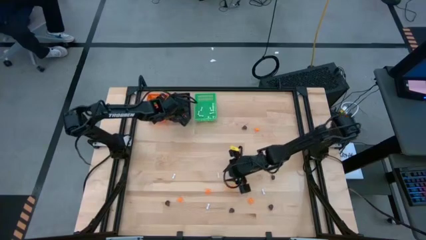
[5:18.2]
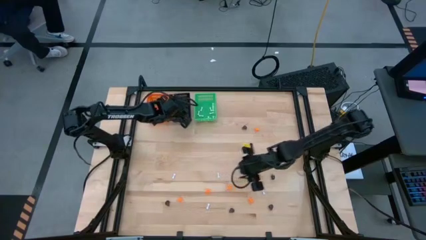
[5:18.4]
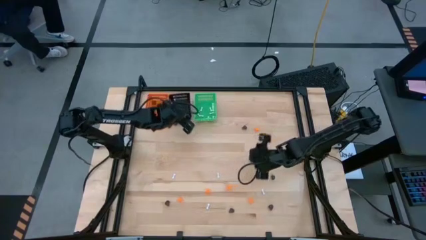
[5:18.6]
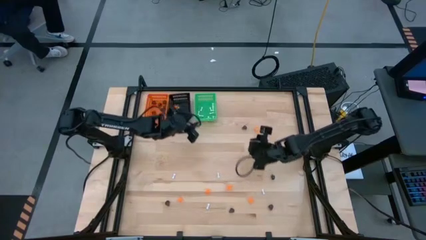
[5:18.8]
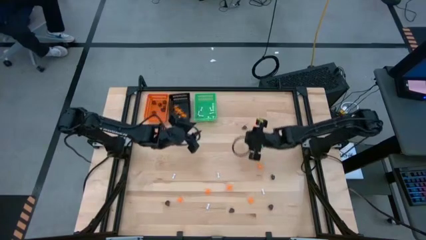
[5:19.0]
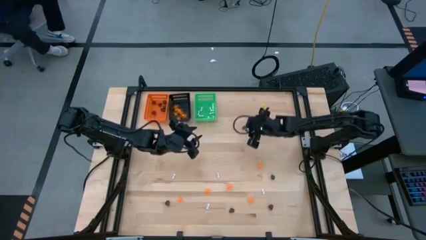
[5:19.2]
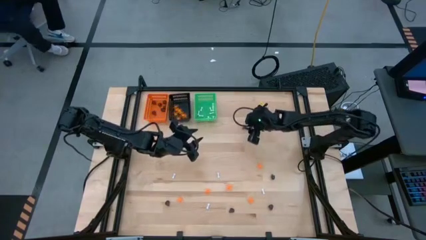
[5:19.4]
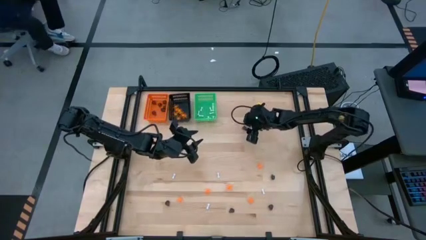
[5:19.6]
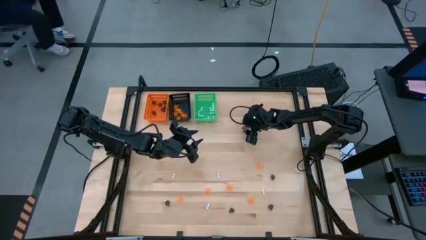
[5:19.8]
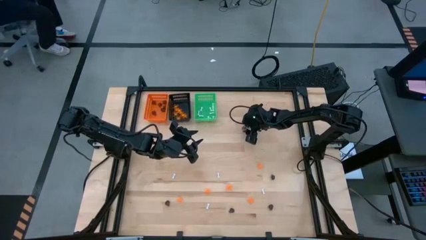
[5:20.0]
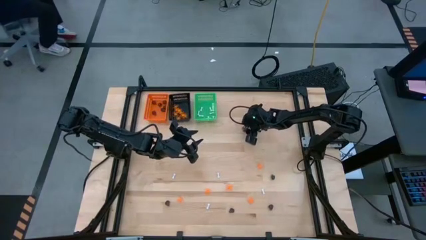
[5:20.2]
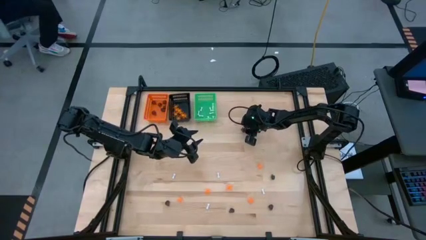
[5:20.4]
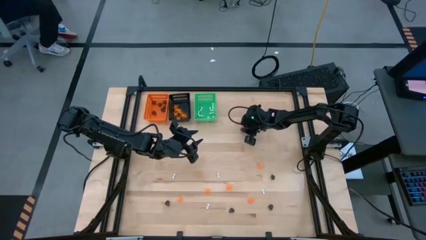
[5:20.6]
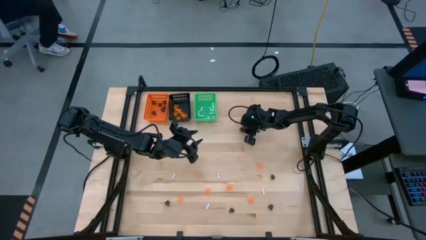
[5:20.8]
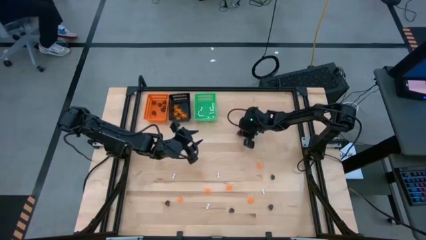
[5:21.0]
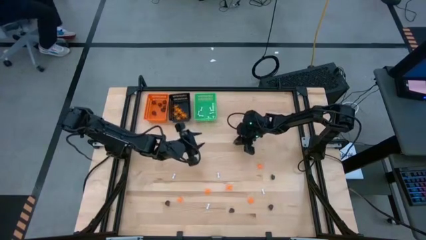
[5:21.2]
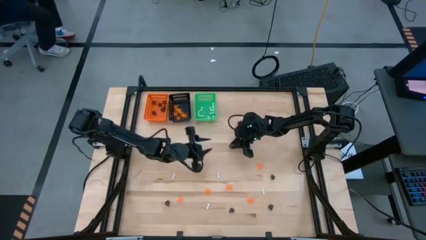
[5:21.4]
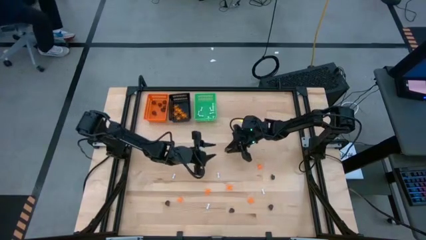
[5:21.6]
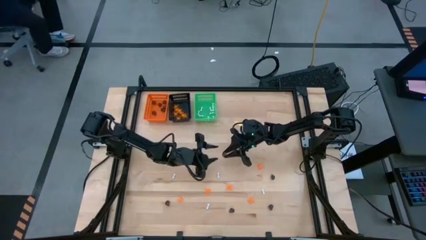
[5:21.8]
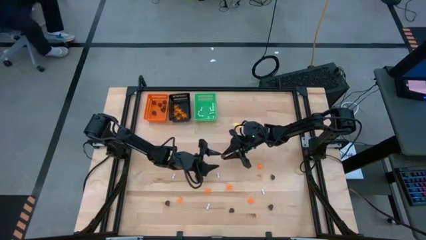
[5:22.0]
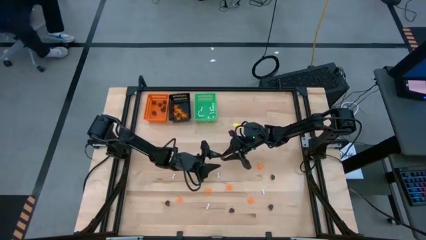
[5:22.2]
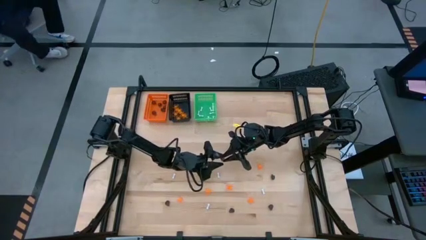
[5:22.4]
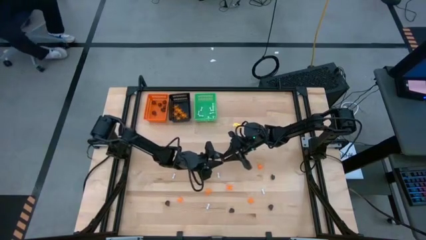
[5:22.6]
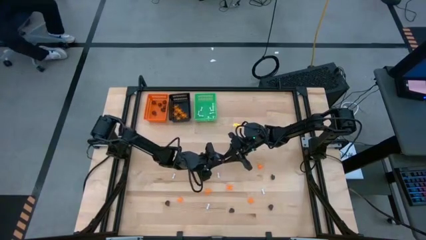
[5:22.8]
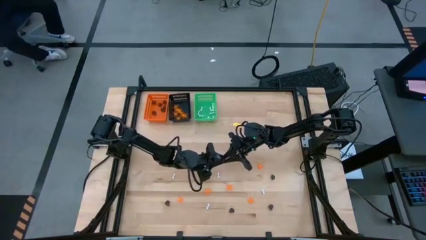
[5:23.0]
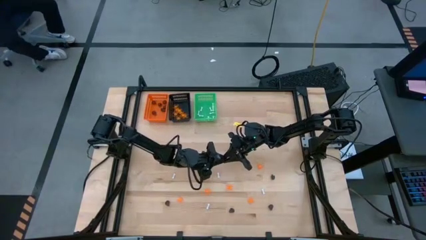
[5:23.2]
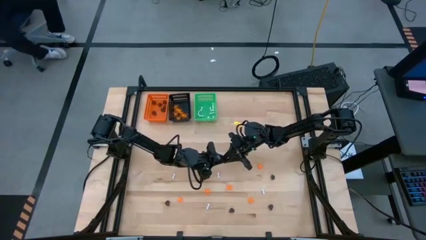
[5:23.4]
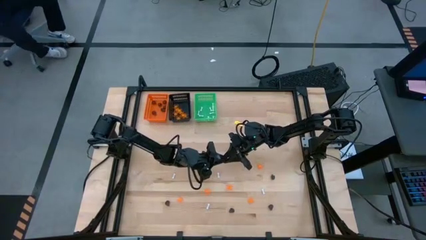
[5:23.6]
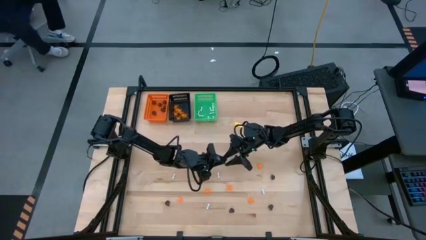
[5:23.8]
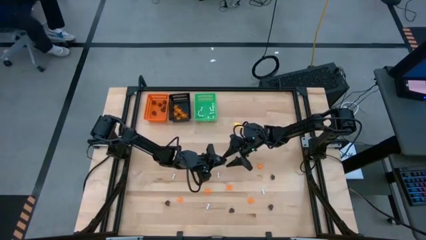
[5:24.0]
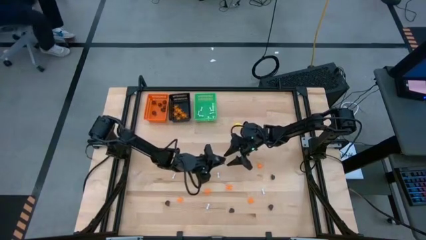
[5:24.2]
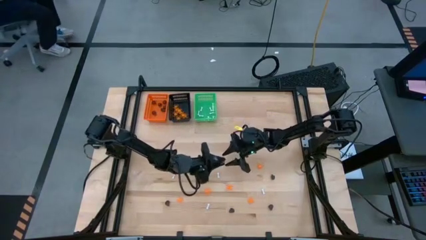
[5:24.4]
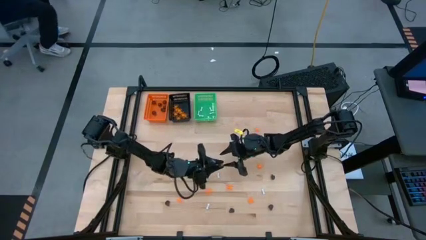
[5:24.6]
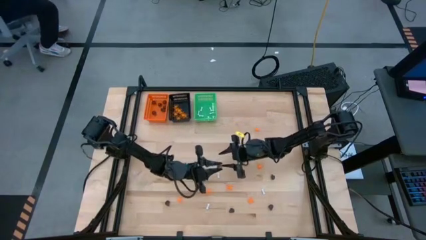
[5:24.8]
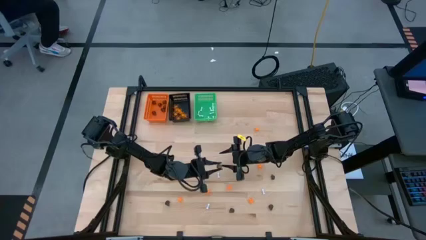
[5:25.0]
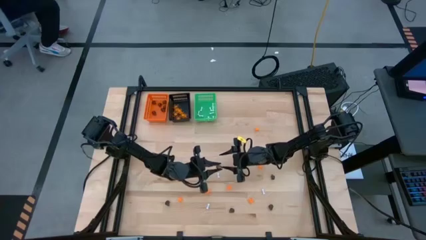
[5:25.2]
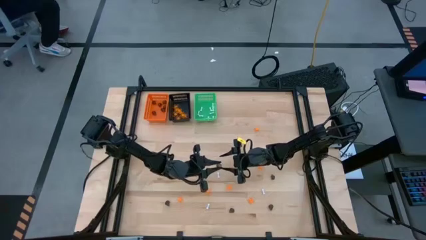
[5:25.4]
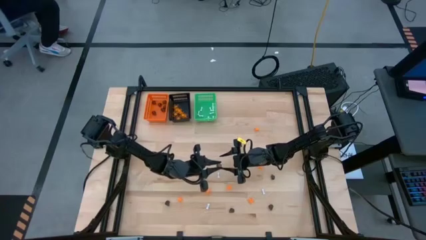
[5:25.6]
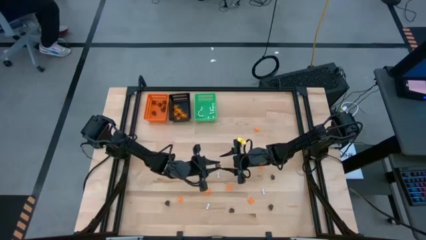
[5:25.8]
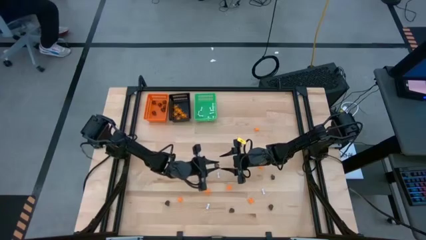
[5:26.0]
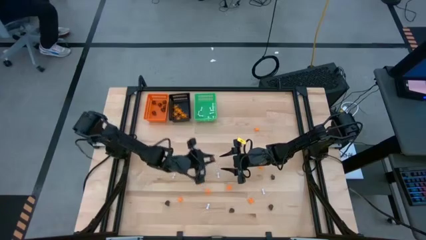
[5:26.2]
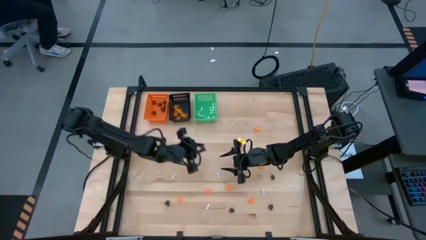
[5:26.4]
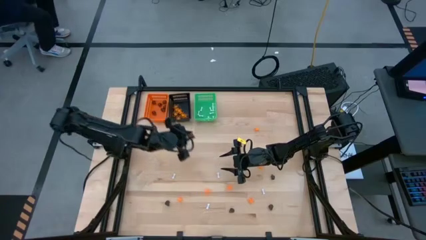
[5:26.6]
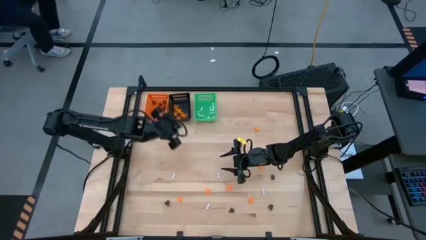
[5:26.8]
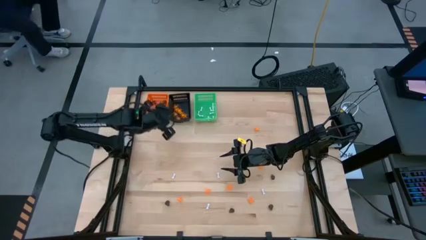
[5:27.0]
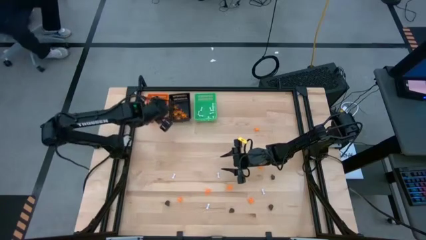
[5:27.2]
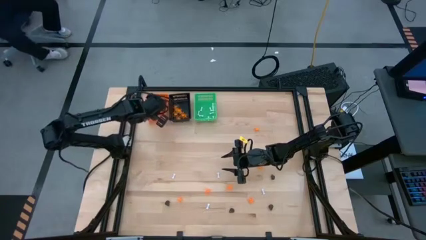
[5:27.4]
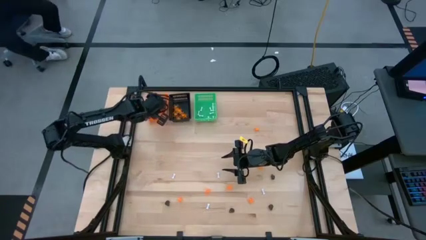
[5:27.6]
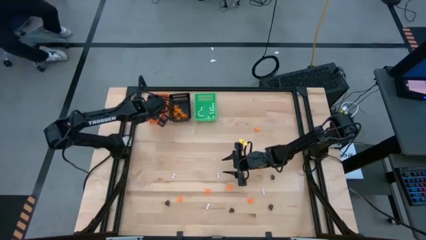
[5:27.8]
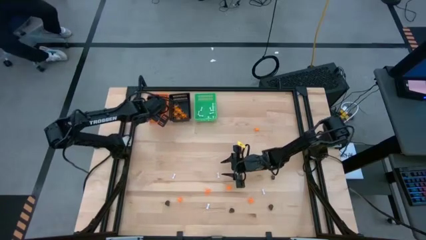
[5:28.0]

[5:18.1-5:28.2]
Task: Sort Halloween decoration
Put the black skull toy into the orange bin

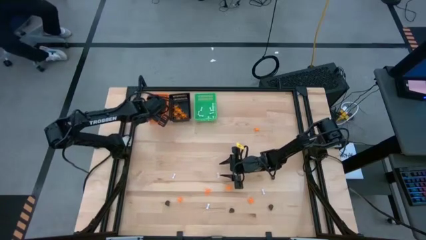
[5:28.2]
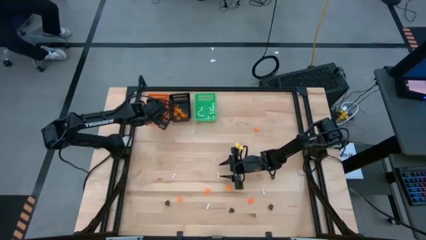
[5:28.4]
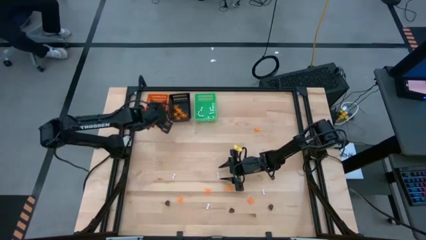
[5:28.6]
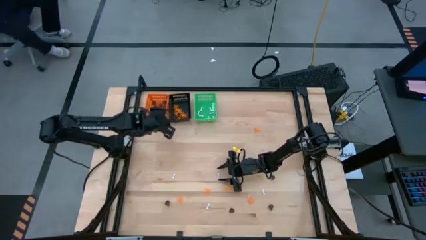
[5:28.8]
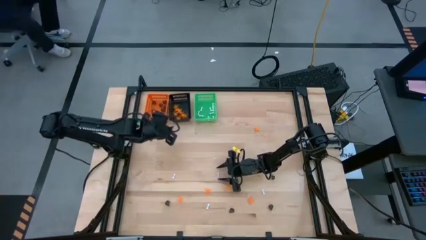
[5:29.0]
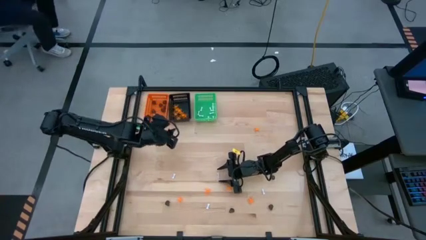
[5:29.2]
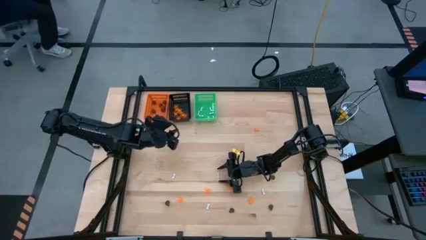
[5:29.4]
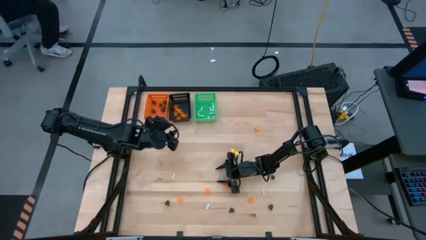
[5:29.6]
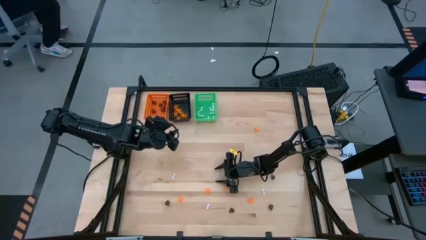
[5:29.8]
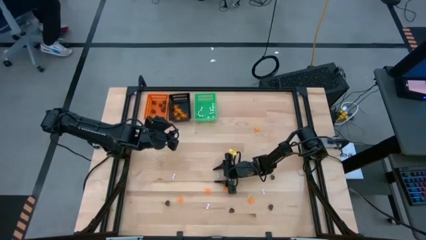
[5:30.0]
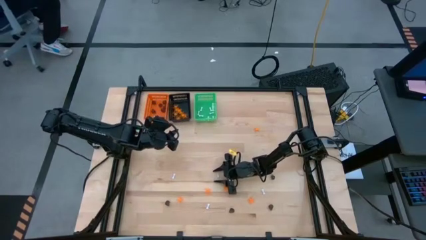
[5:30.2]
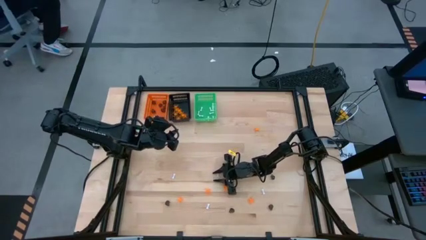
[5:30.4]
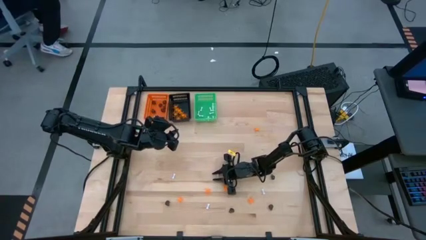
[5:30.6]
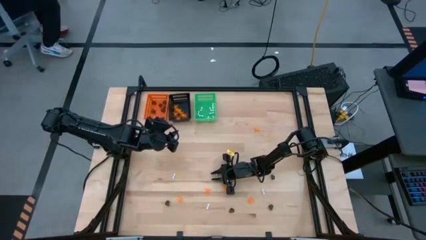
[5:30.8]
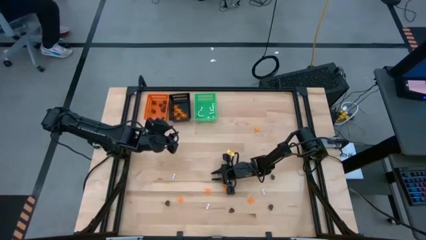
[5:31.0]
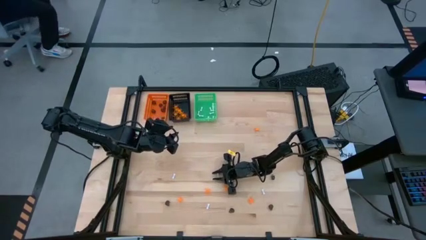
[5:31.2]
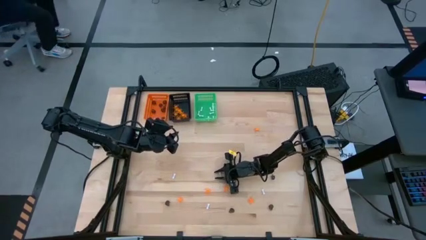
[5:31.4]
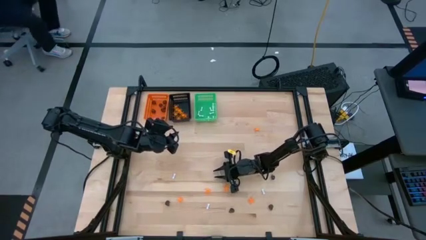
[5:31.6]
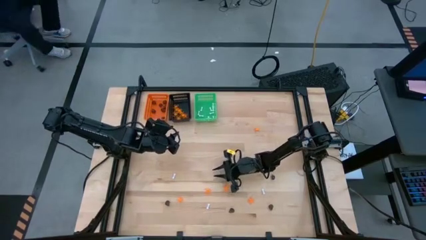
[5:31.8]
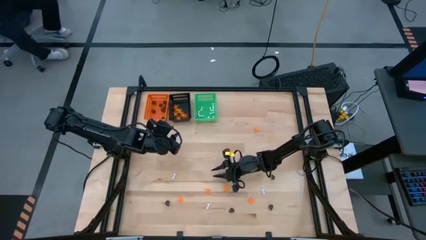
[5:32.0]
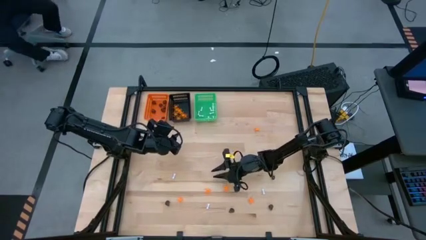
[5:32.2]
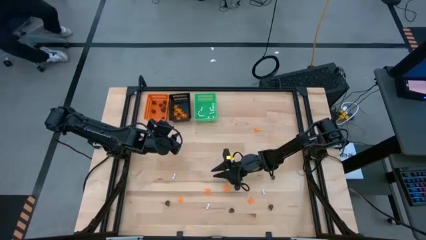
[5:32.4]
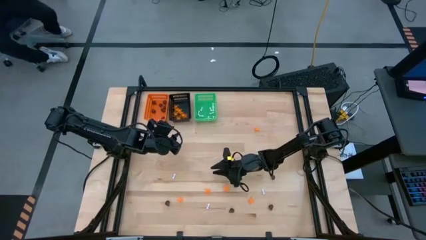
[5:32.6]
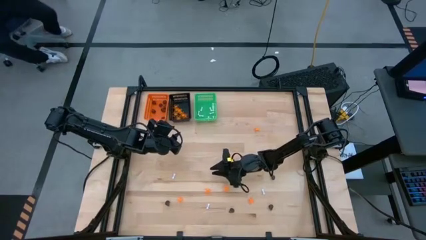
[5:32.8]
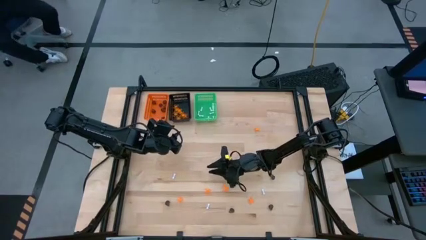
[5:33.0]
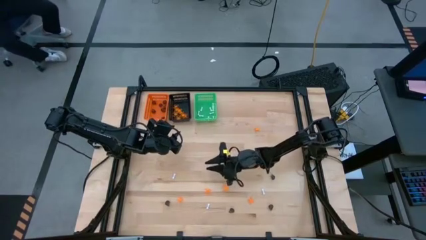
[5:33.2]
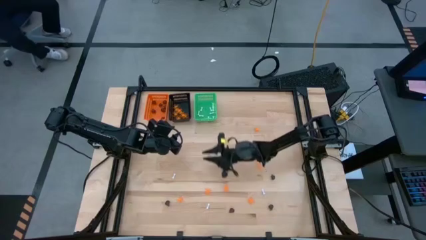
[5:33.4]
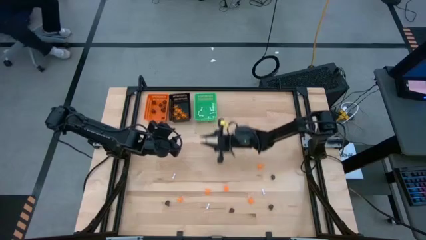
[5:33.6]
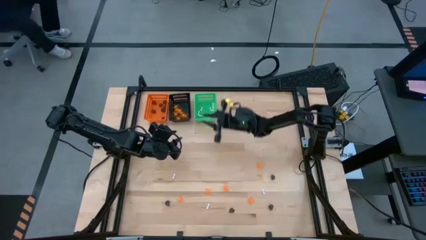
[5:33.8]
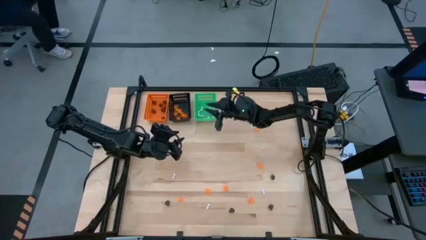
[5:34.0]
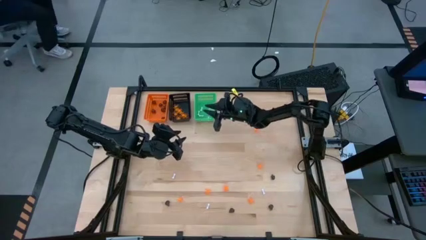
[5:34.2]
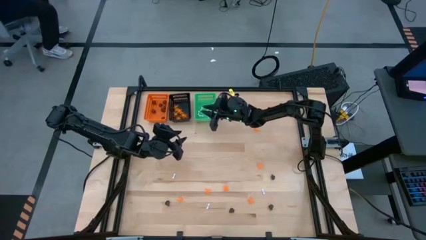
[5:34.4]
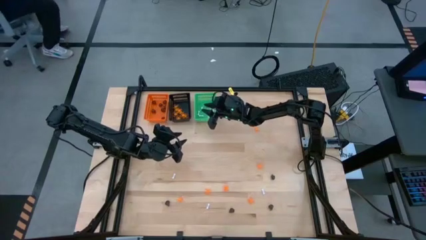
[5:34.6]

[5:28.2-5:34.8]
Put the white bone toy into the green bin
